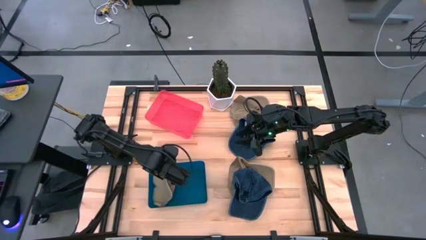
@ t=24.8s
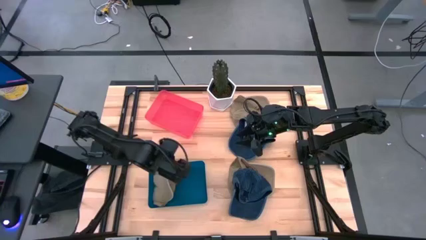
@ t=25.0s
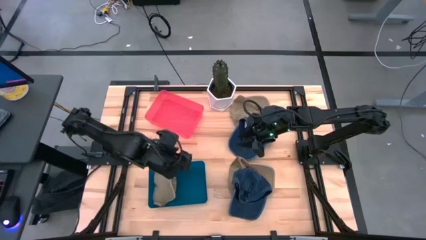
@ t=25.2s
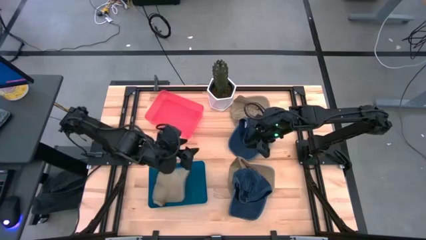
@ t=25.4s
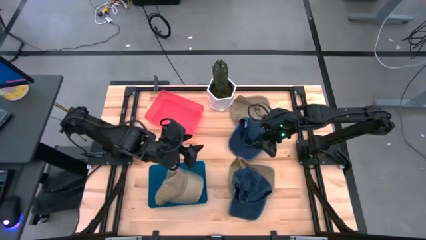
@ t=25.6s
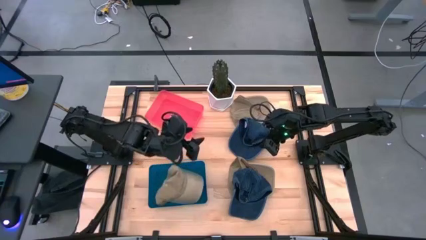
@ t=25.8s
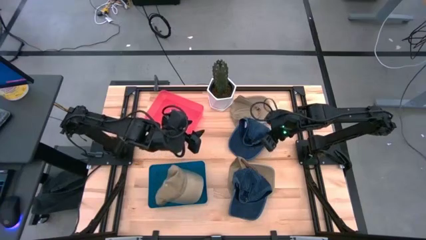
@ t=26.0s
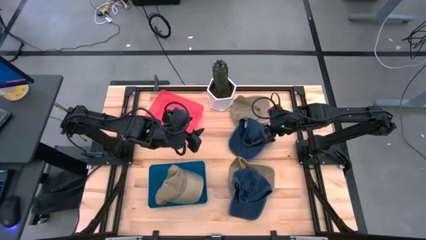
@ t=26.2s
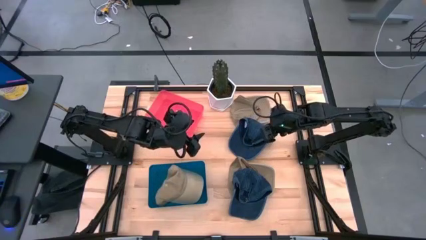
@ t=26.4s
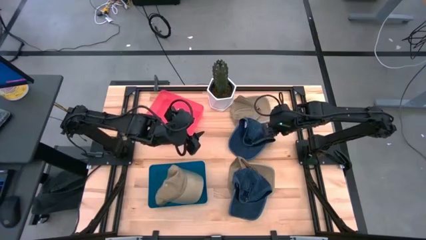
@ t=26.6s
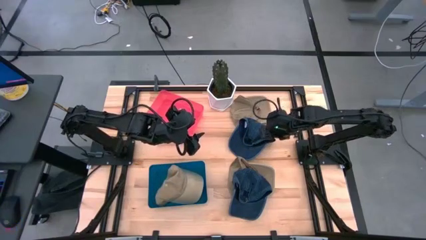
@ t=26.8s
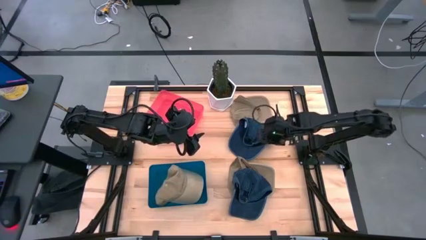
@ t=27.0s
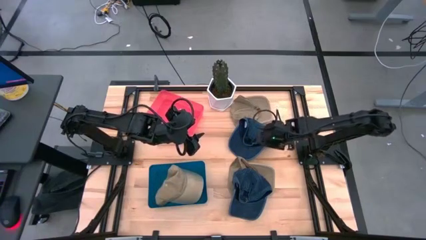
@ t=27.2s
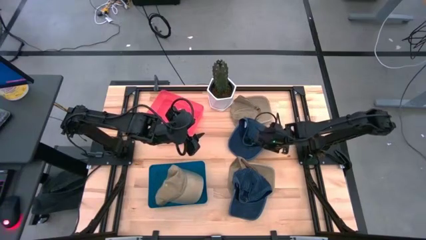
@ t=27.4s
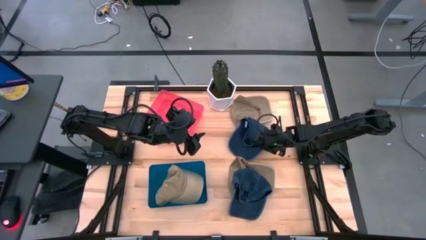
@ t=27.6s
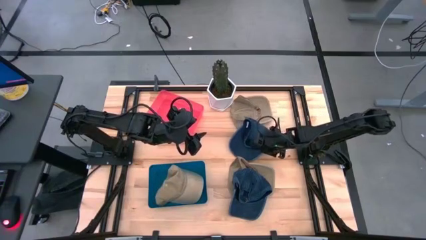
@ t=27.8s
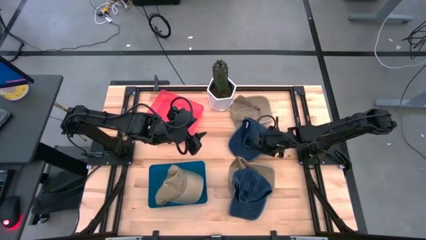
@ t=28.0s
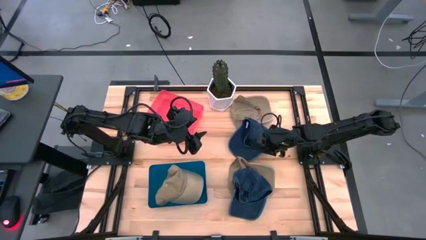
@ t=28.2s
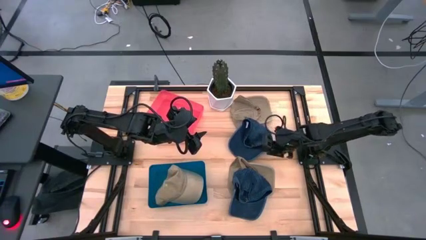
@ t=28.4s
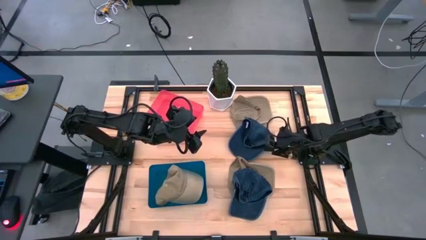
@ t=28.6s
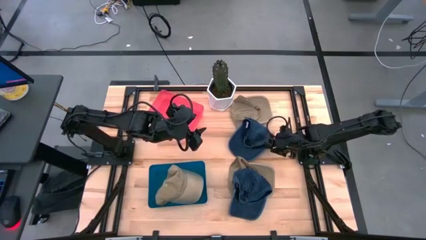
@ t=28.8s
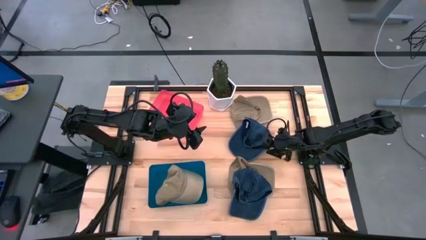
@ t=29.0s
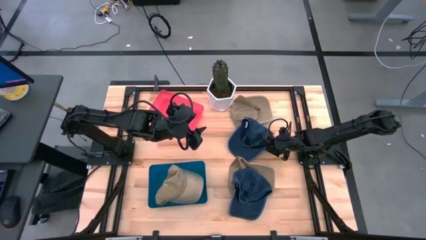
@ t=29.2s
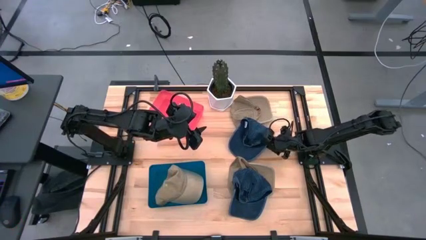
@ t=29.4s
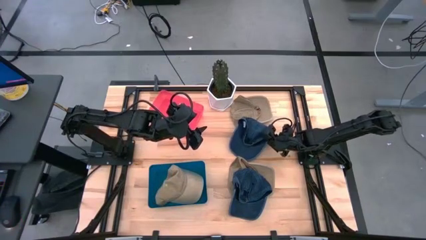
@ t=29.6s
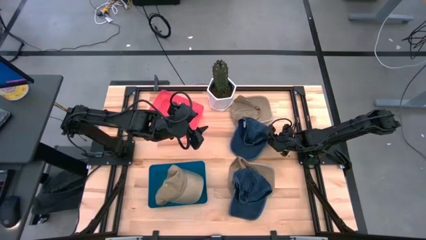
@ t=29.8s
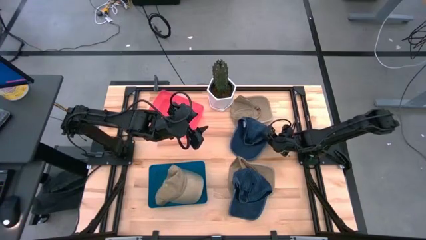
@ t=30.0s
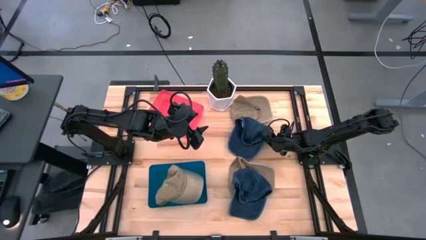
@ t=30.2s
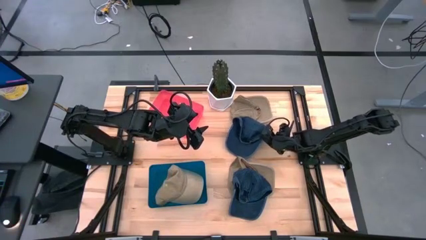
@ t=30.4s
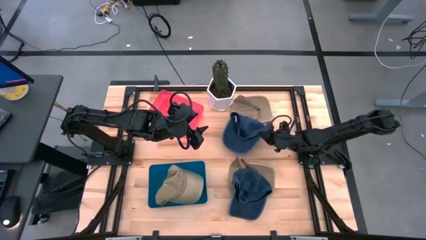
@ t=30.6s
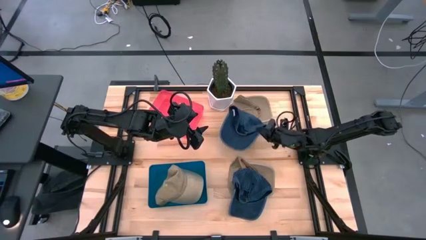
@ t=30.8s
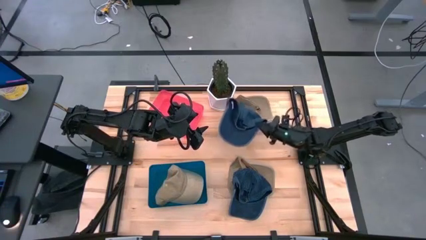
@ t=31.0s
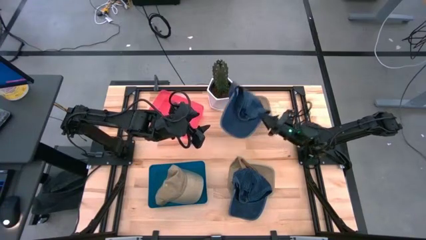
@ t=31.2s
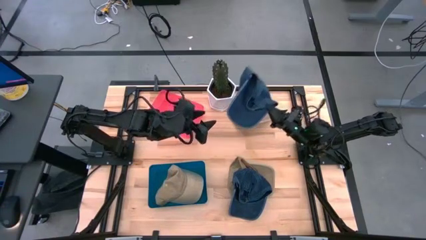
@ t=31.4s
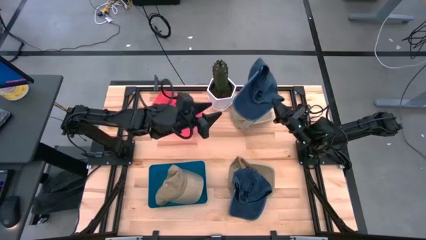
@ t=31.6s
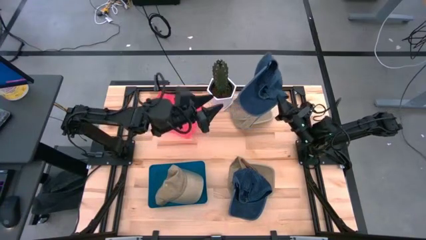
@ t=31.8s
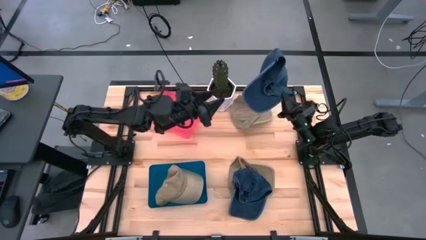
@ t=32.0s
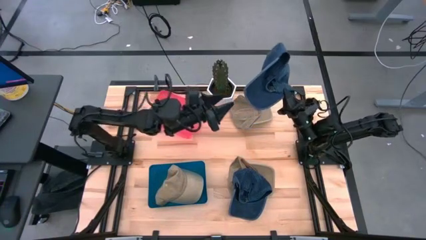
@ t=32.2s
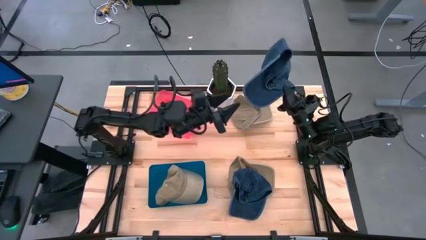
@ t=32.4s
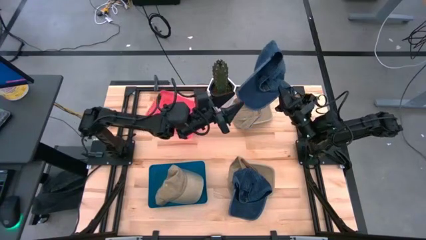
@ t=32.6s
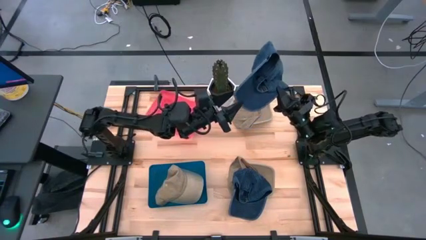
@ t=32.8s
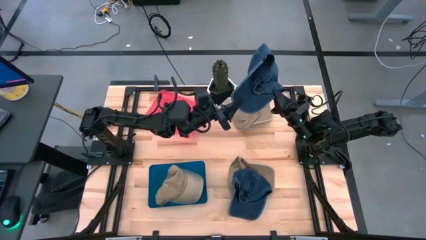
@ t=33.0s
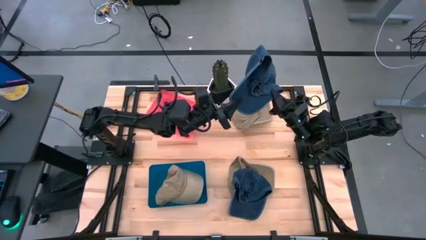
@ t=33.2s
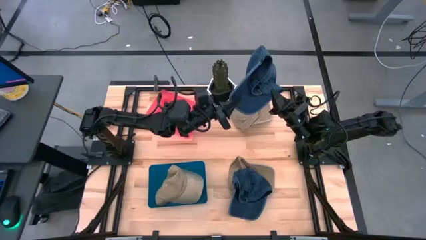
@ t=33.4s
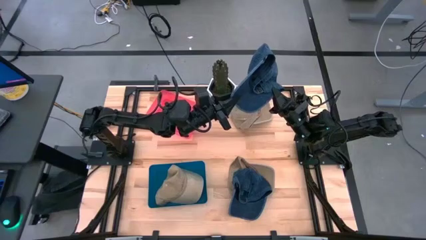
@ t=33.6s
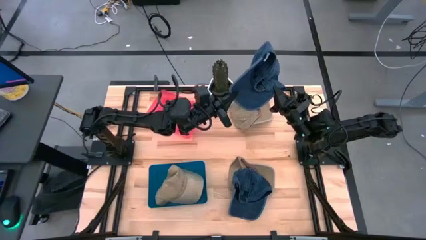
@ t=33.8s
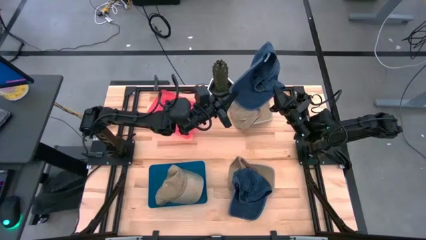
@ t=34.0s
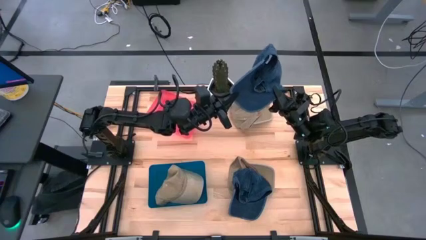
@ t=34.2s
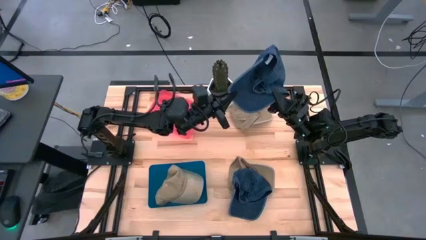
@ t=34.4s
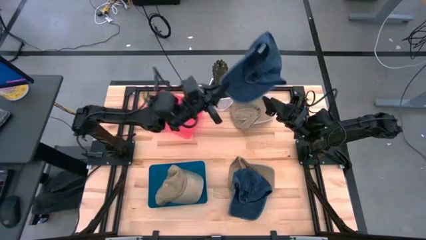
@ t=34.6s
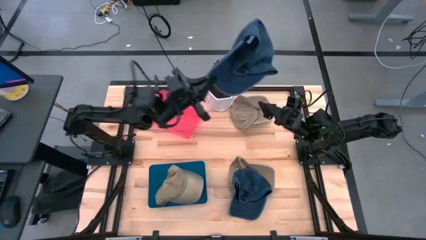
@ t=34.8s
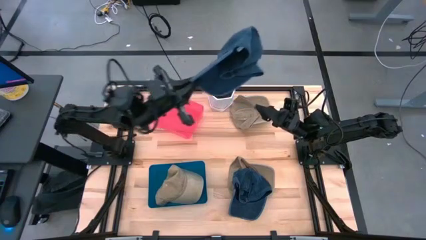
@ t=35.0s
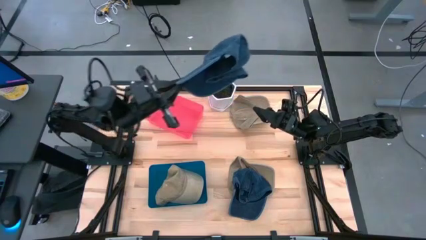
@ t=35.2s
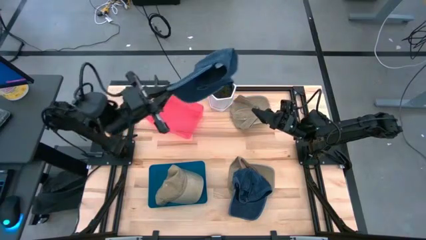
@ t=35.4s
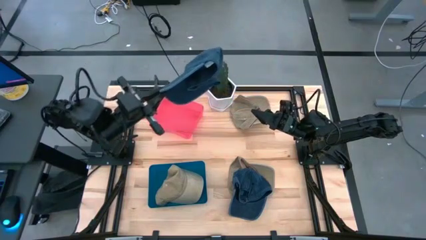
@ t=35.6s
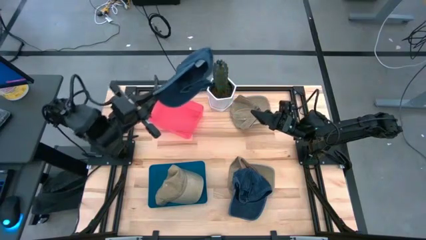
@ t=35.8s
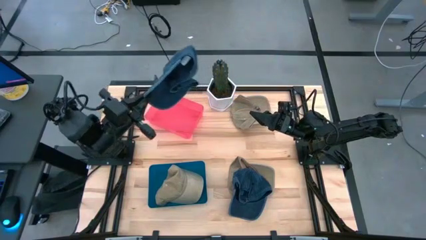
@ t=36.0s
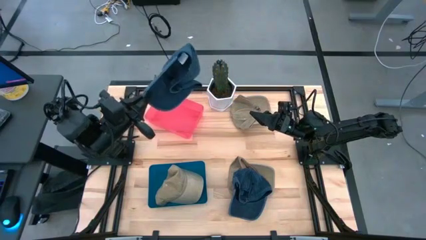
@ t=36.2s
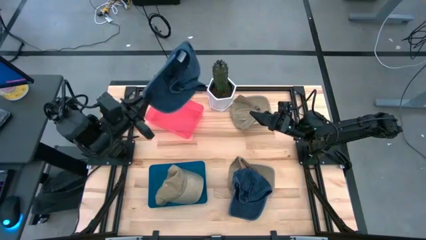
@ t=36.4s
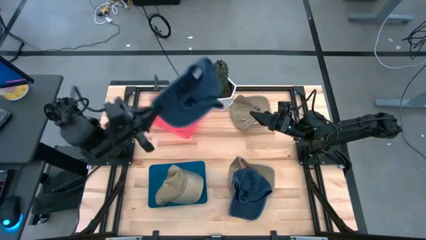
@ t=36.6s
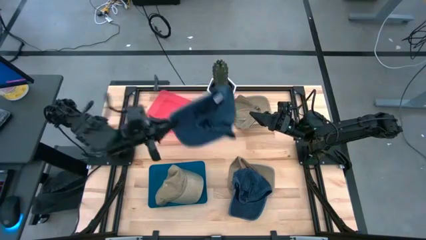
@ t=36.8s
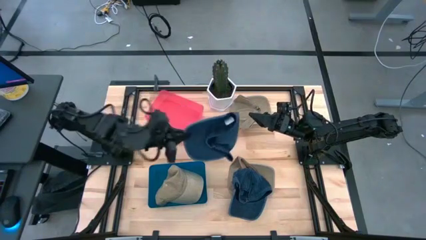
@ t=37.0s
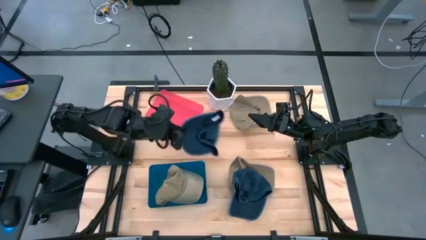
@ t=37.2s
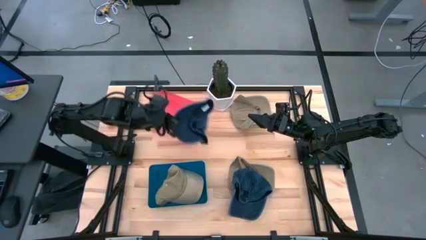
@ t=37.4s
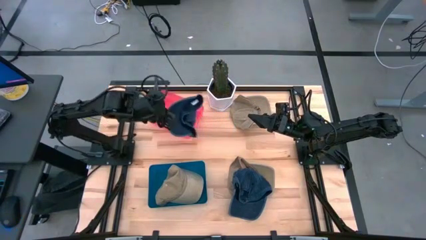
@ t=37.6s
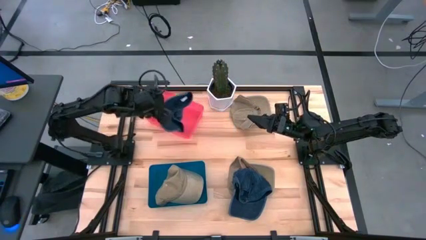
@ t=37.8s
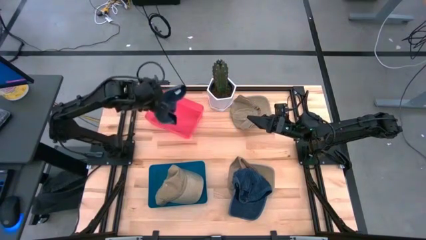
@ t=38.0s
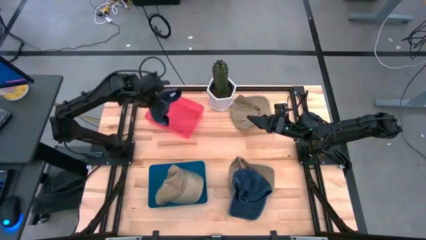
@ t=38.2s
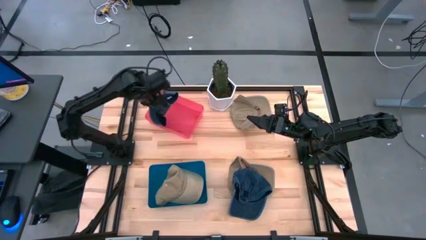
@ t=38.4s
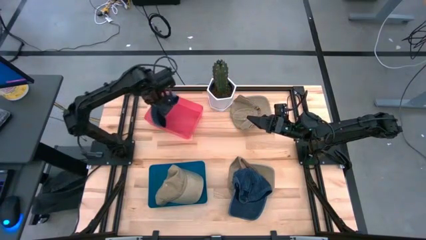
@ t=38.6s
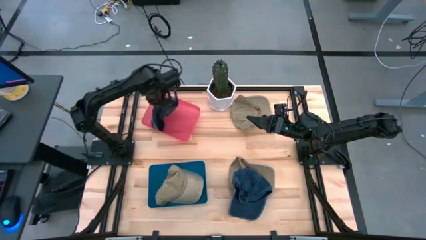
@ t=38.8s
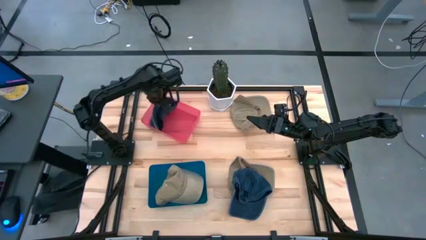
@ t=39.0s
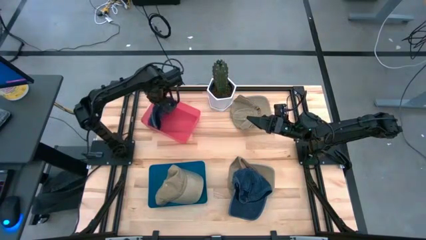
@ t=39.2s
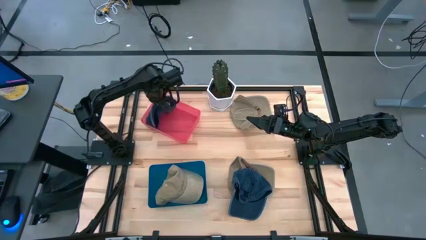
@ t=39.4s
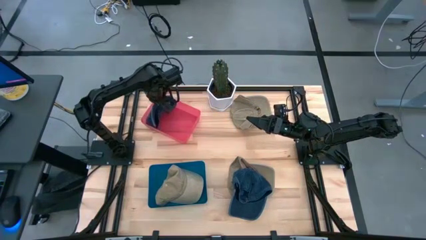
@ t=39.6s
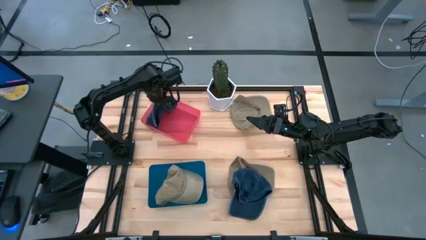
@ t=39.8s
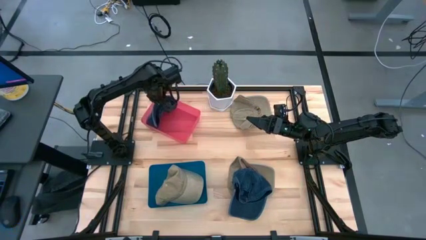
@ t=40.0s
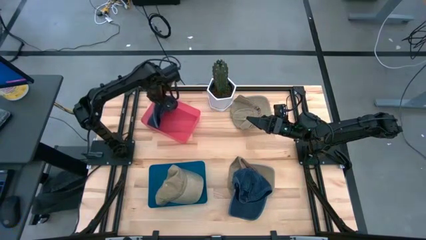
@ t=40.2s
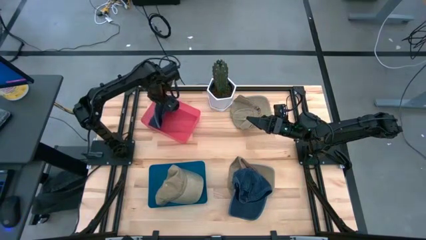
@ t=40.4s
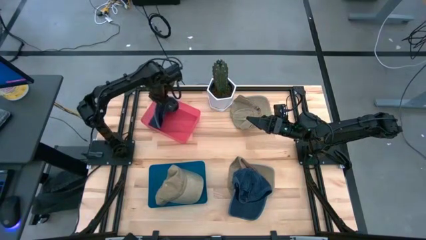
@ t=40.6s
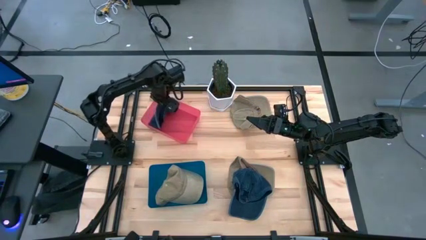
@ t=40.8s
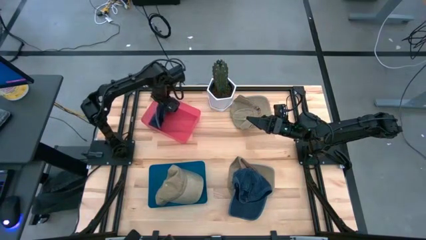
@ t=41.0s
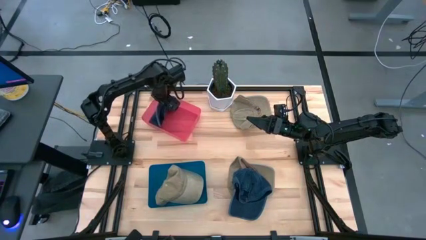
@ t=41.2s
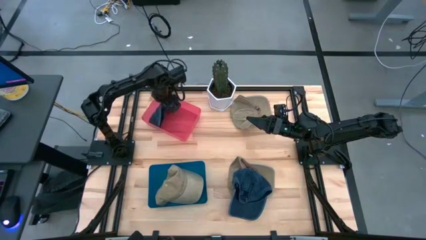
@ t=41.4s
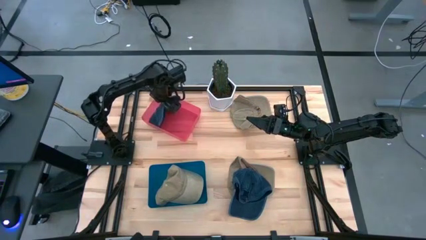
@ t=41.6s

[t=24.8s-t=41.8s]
Task: Pick & Place hat
Put the top blue cap into the pink bin
